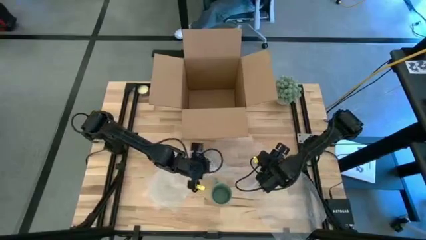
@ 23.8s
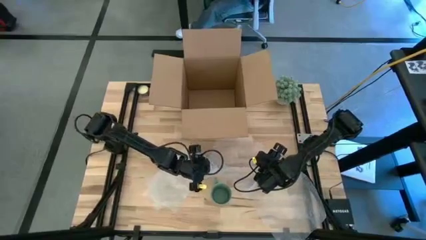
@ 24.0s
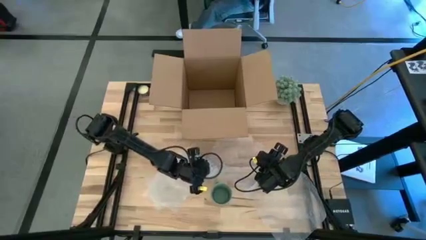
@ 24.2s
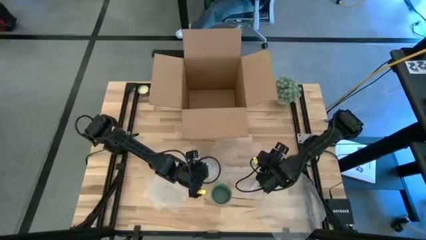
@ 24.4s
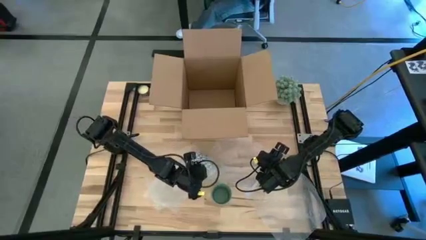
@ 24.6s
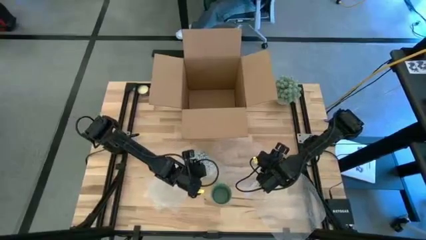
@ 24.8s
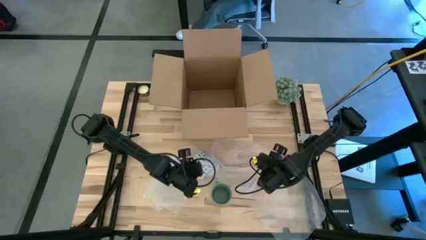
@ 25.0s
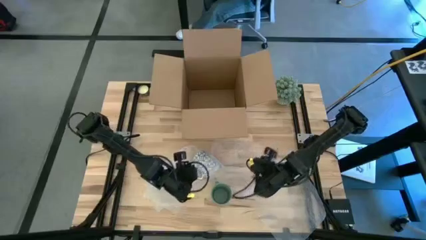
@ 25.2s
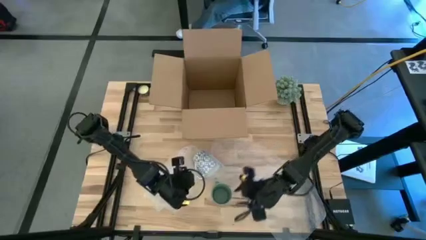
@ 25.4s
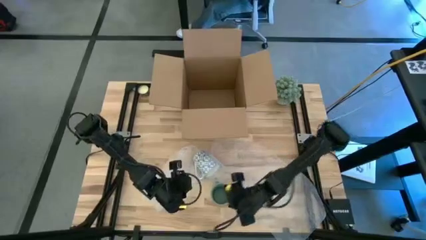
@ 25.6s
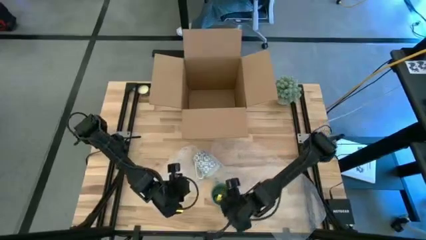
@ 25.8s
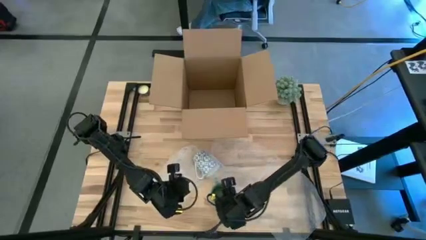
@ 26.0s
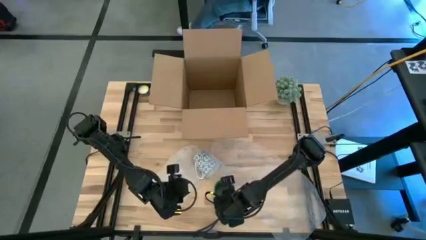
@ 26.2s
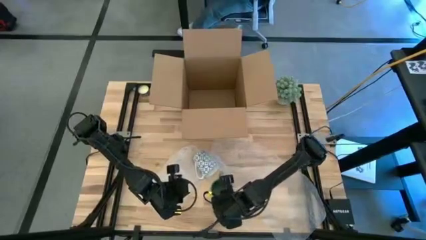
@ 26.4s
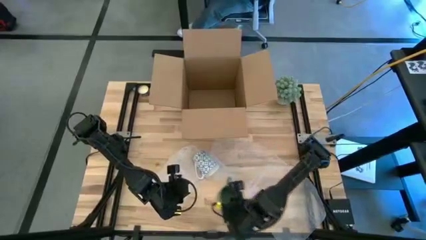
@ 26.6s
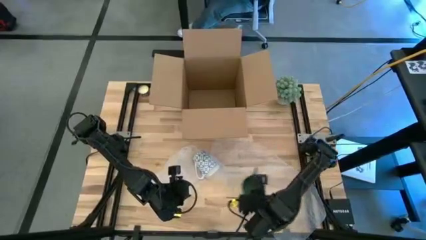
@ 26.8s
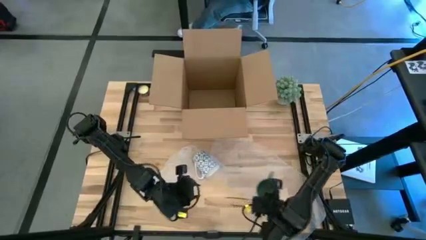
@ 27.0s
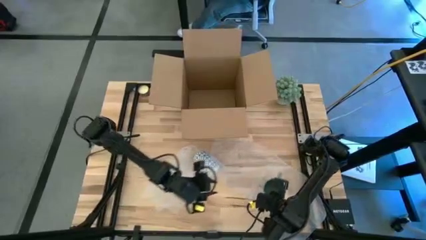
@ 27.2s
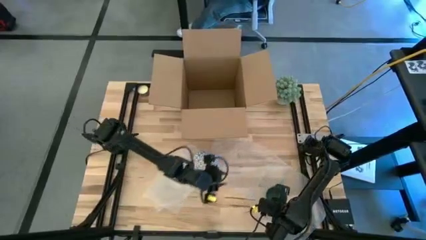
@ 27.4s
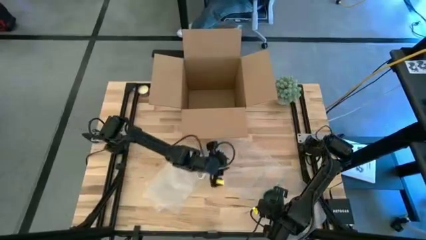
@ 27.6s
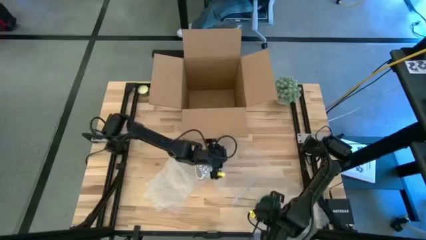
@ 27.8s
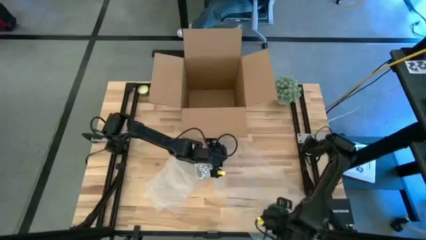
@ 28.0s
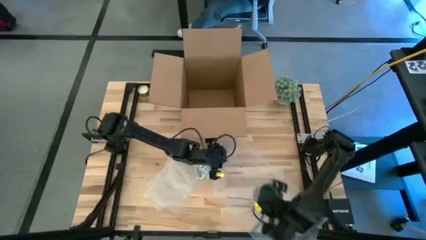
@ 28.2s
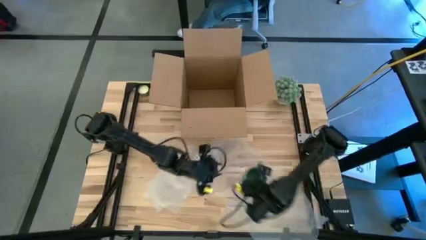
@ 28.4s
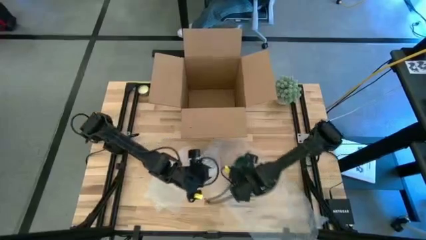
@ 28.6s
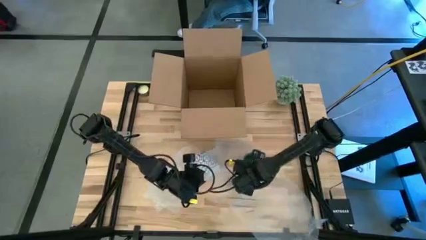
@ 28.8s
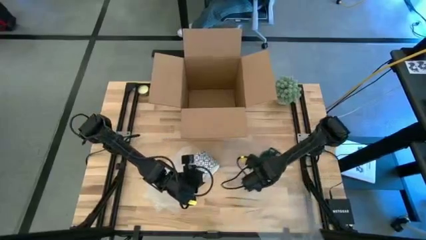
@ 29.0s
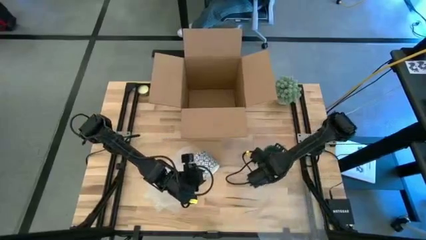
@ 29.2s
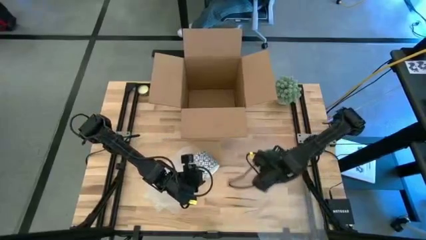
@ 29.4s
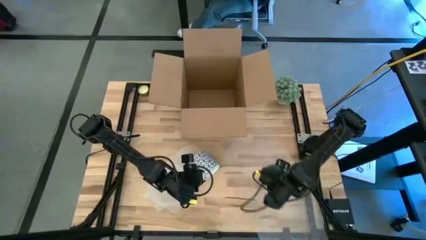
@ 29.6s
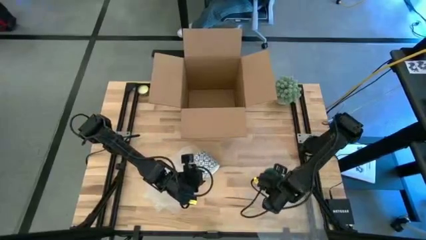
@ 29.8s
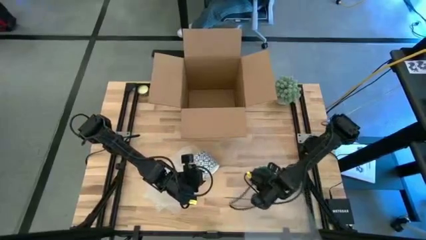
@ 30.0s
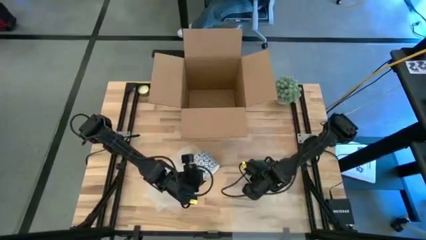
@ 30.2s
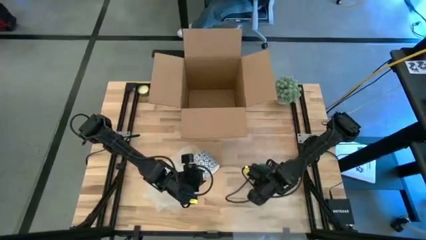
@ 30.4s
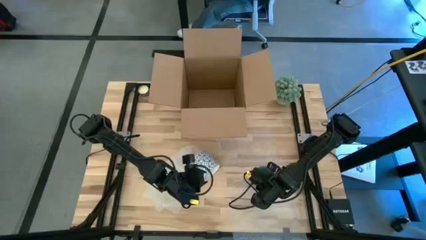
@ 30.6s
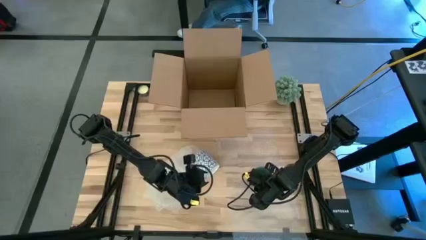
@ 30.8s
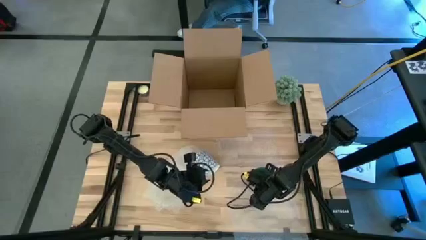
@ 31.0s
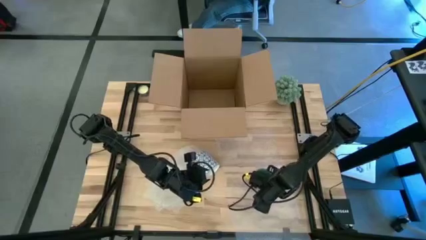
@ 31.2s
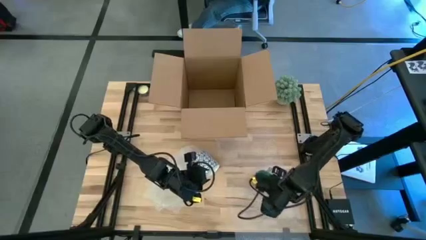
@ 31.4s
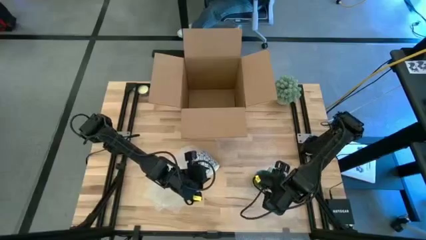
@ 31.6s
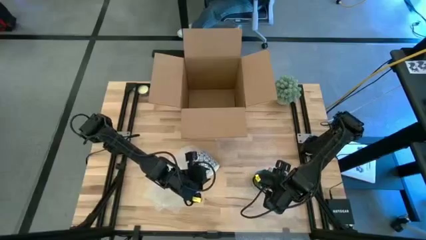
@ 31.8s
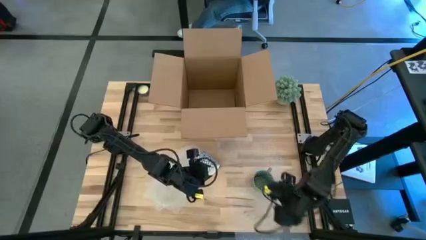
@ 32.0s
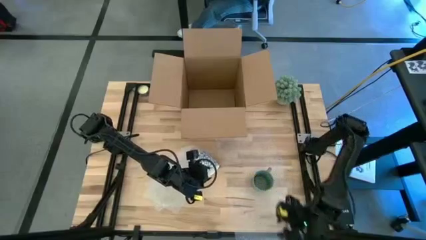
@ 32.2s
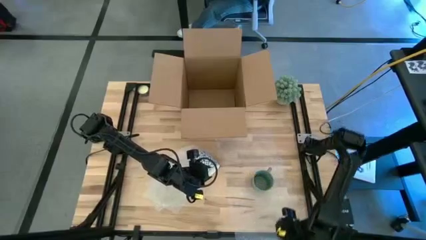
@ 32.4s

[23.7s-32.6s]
Task: wrap mug
Wrap the green mug with the right transparent bubble wrap

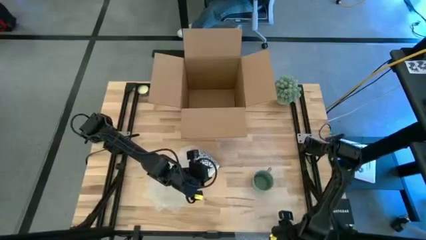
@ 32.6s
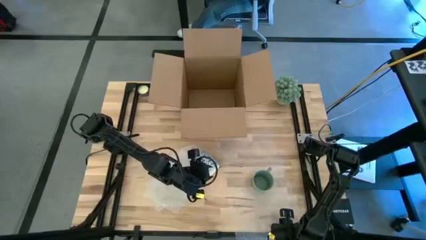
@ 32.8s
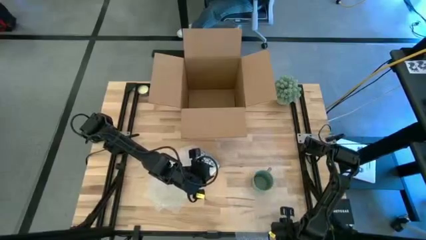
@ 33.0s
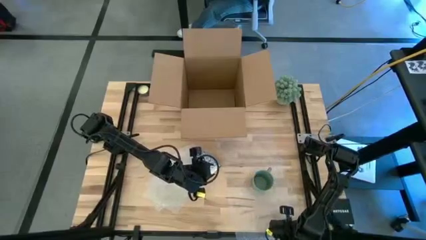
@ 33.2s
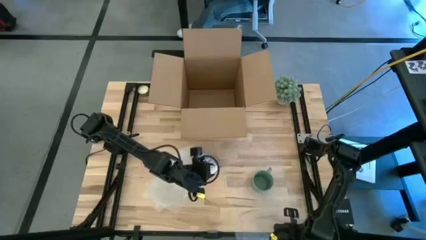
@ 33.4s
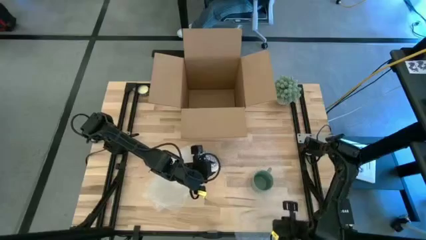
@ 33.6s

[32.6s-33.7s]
Wrap the green mug with the right transparent bubble wrap

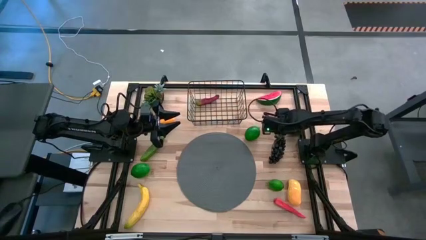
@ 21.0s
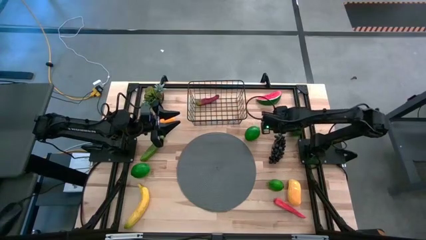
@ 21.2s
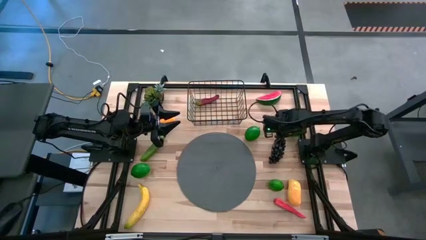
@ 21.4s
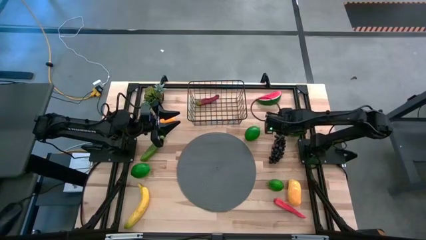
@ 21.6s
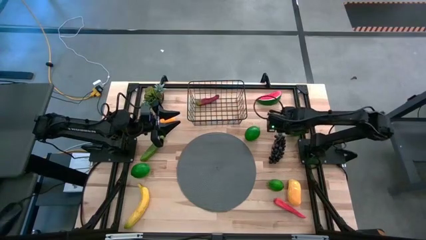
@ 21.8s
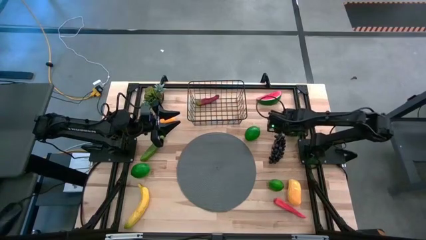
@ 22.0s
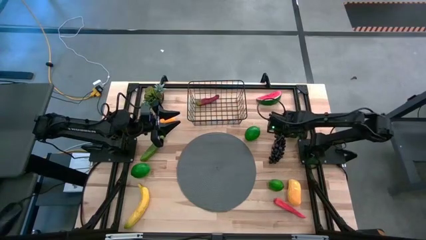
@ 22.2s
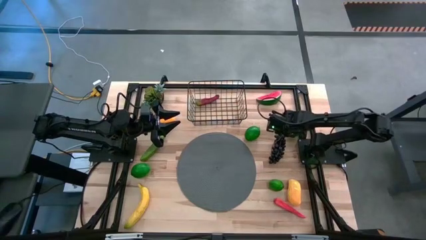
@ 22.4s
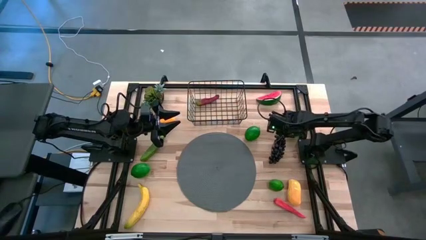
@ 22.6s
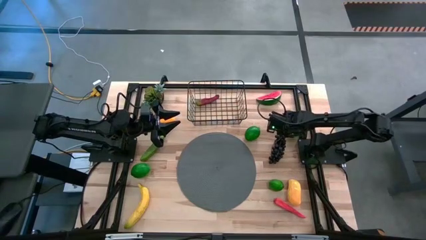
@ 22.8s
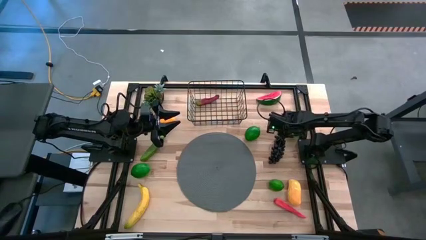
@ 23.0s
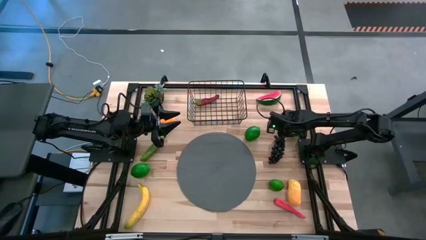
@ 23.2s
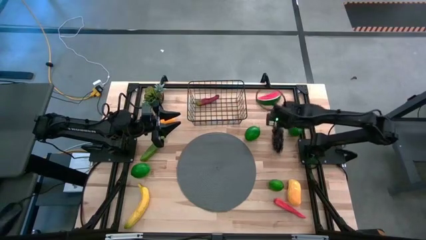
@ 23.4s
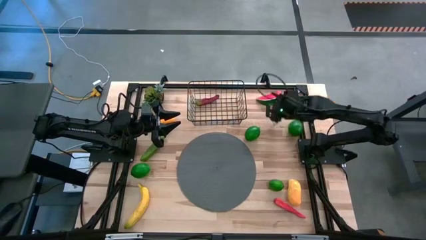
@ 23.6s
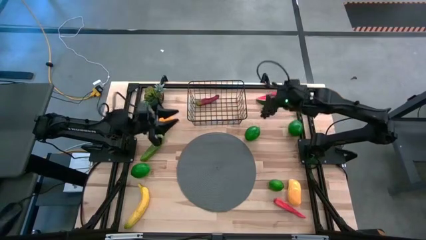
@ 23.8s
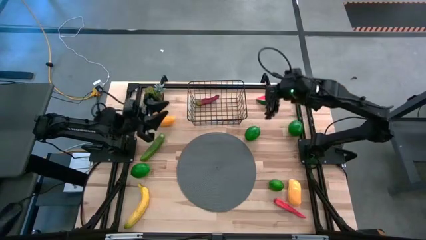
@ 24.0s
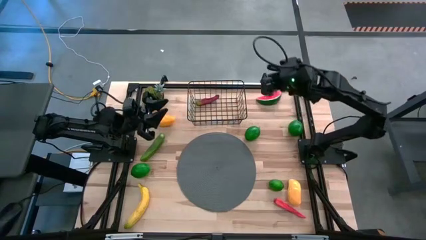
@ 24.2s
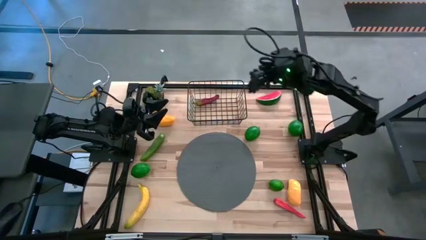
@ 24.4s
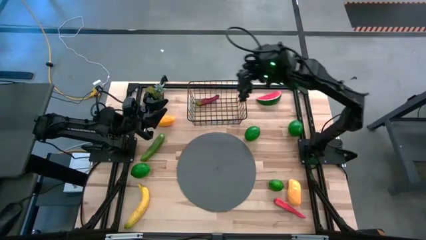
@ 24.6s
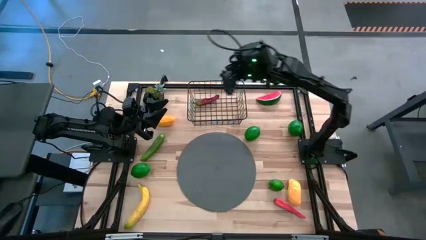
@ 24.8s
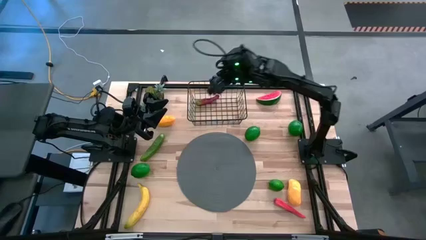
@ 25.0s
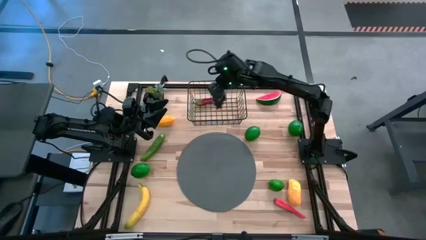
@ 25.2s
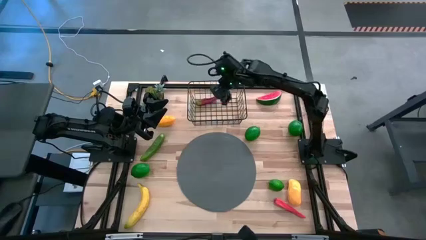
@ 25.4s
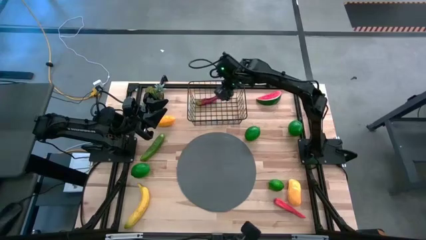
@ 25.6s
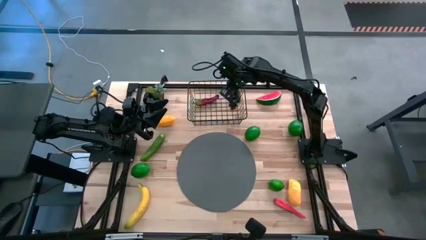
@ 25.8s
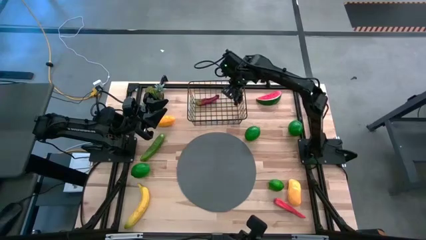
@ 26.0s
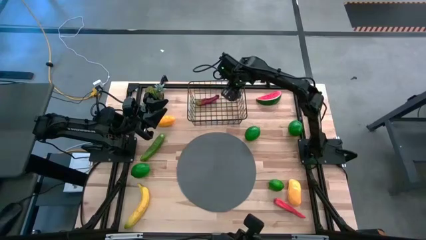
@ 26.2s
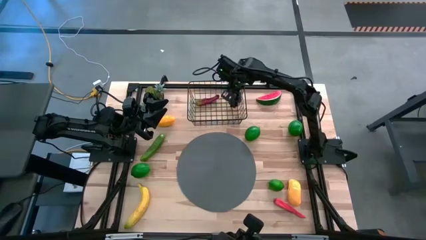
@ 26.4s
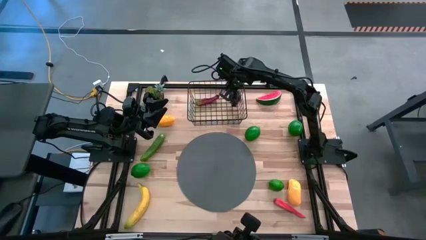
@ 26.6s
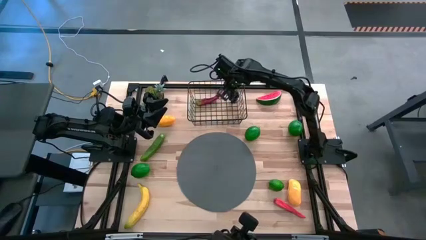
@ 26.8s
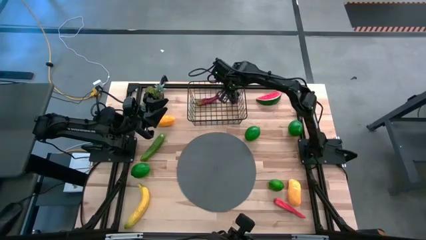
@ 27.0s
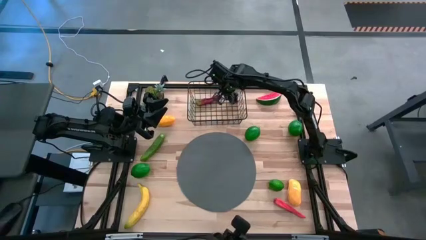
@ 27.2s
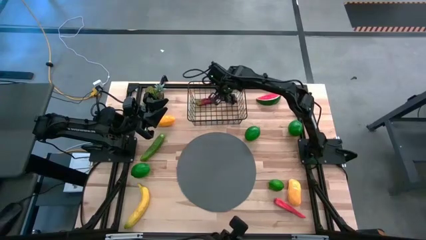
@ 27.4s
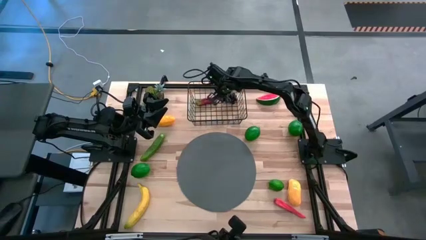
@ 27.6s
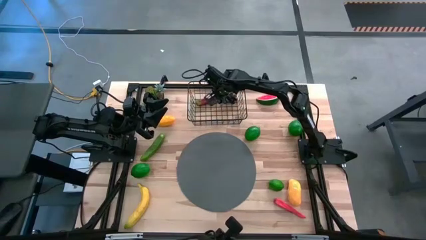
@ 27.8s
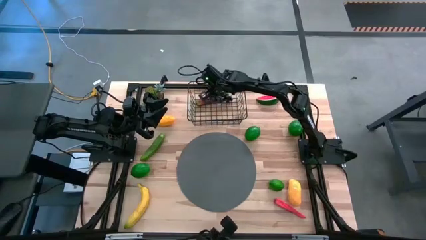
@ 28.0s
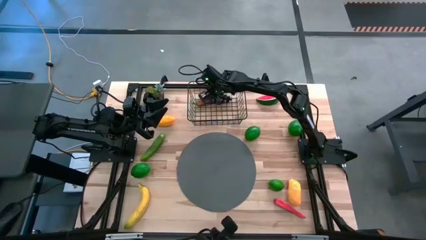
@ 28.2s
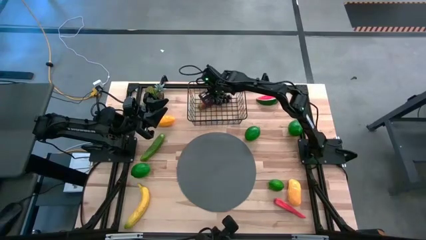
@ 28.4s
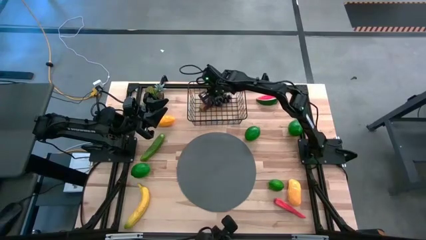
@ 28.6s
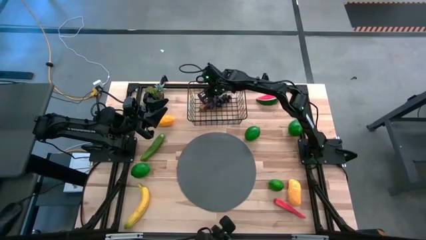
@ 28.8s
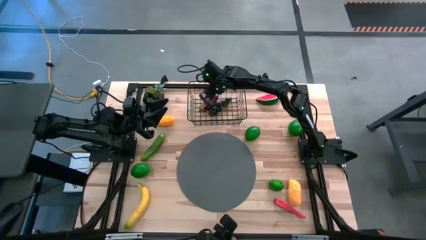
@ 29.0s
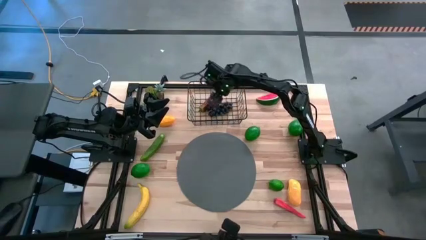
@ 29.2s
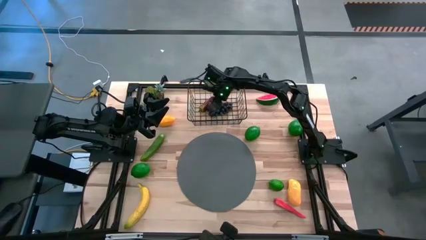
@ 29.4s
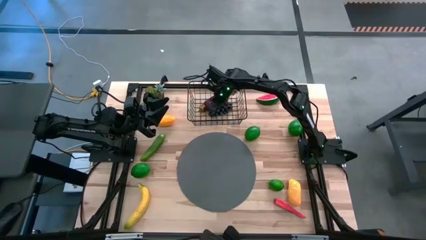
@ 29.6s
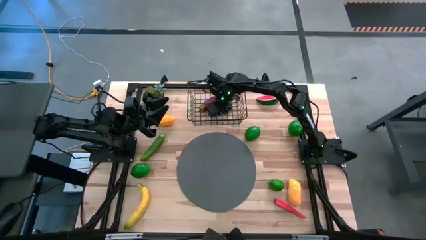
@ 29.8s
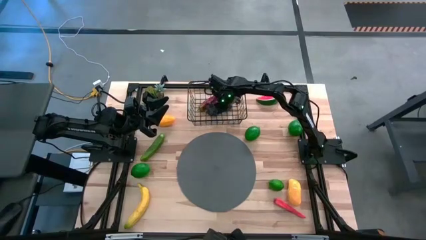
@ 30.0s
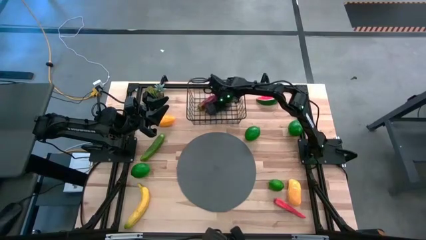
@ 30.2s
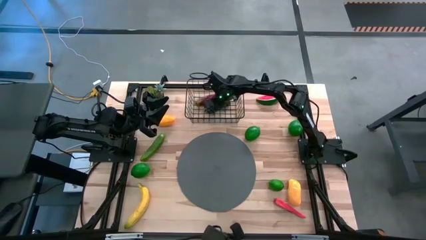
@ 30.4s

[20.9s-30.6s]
Task: Build produce basket
Put the black grapes into the black wire basket
